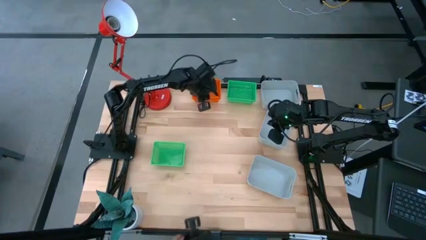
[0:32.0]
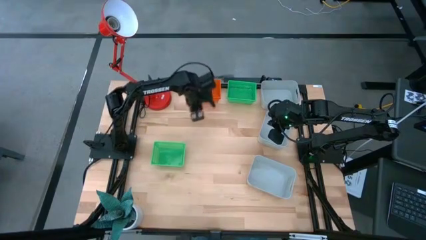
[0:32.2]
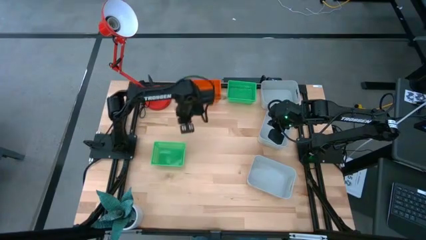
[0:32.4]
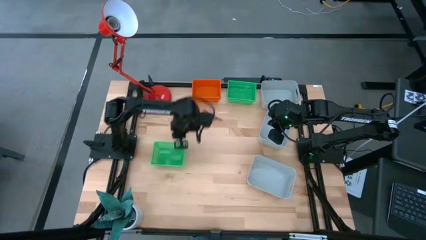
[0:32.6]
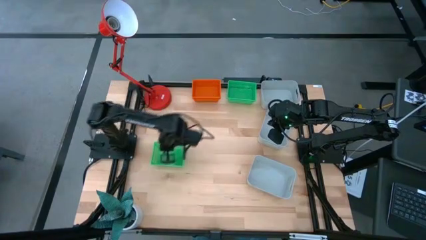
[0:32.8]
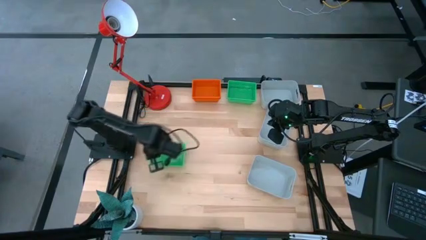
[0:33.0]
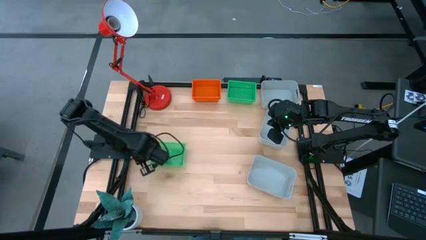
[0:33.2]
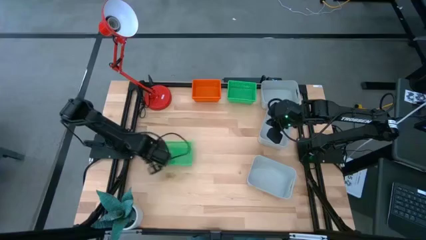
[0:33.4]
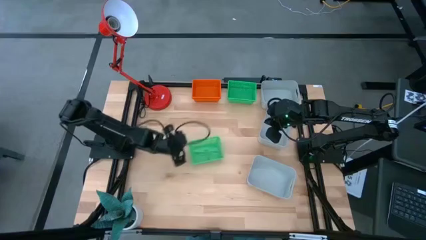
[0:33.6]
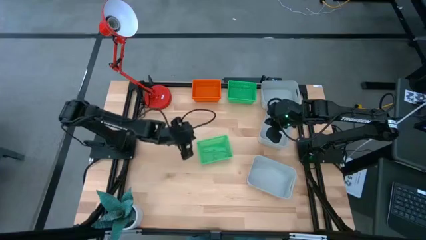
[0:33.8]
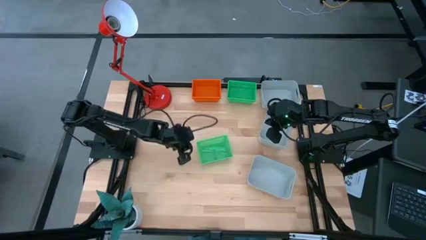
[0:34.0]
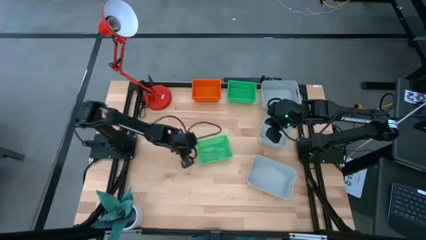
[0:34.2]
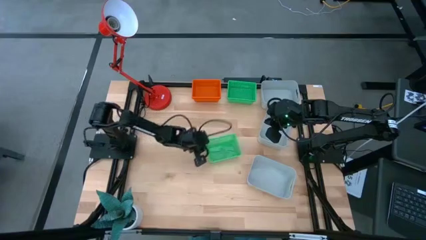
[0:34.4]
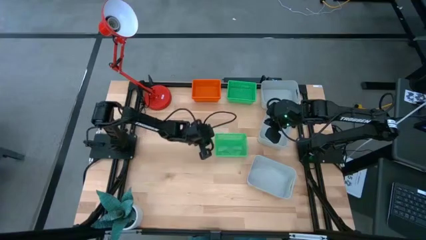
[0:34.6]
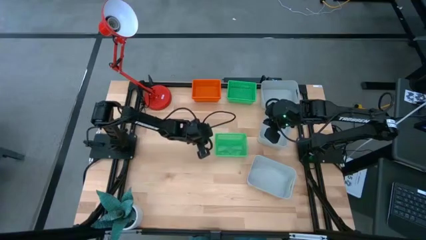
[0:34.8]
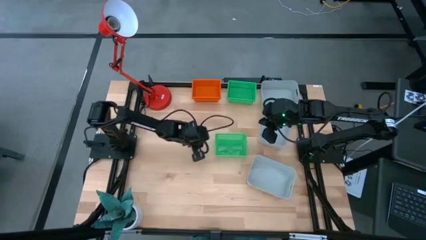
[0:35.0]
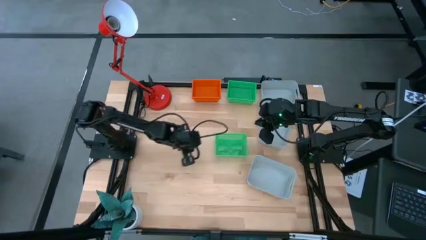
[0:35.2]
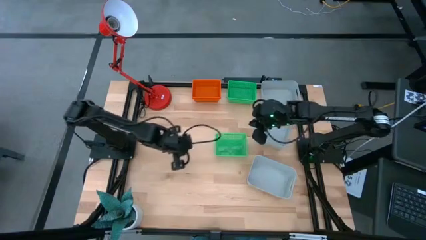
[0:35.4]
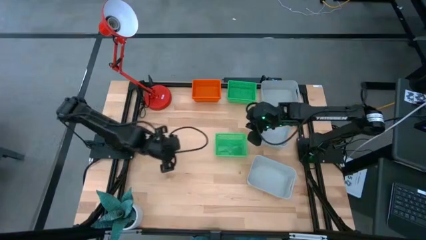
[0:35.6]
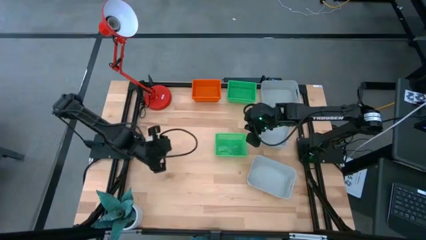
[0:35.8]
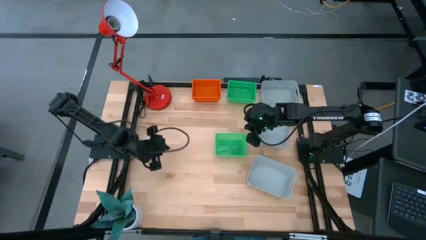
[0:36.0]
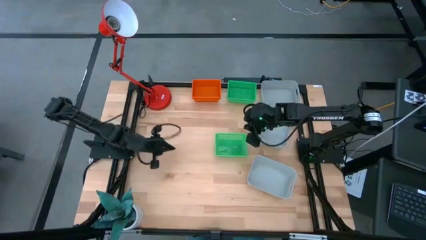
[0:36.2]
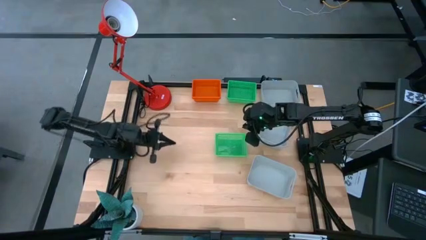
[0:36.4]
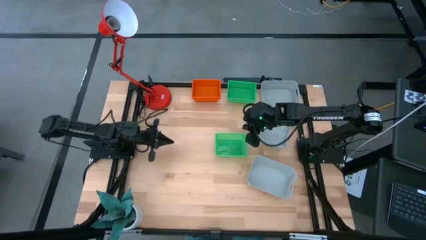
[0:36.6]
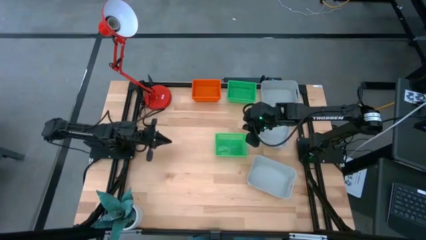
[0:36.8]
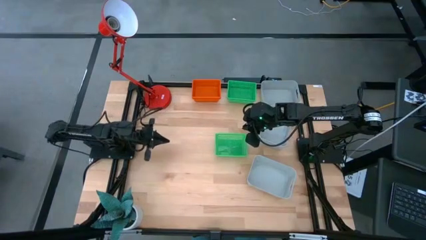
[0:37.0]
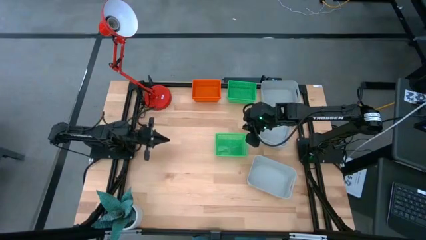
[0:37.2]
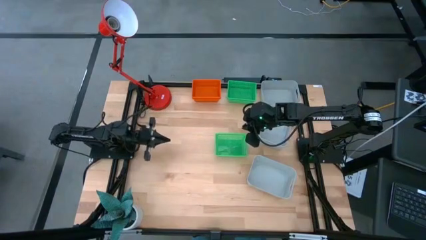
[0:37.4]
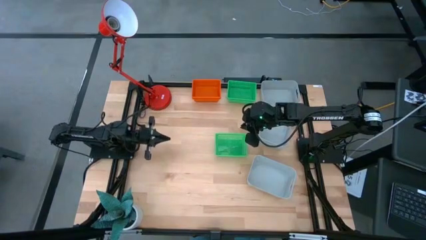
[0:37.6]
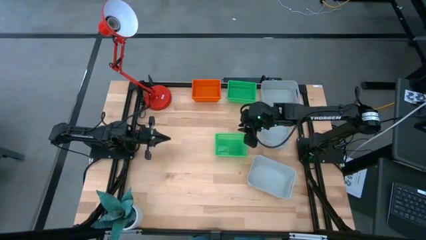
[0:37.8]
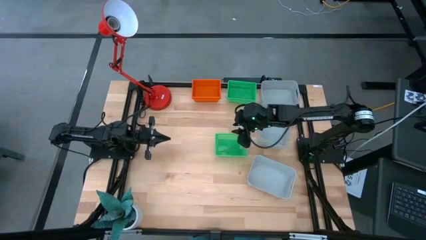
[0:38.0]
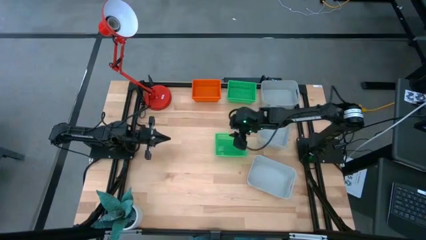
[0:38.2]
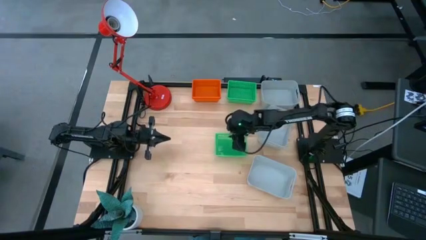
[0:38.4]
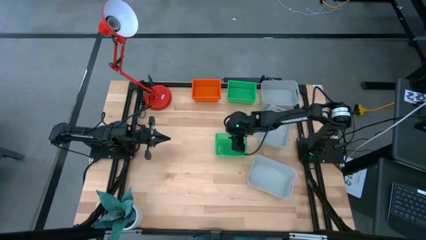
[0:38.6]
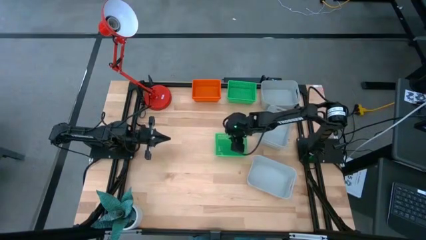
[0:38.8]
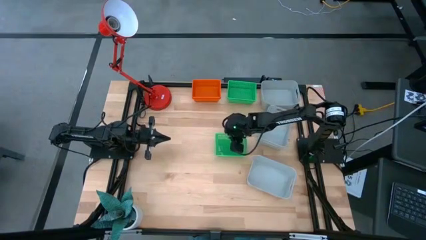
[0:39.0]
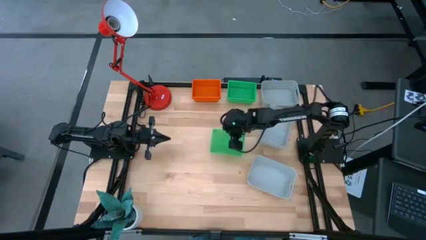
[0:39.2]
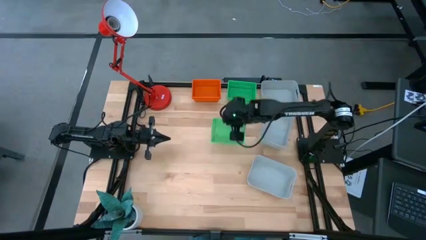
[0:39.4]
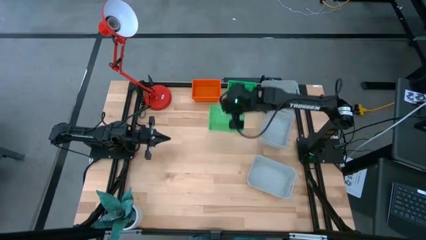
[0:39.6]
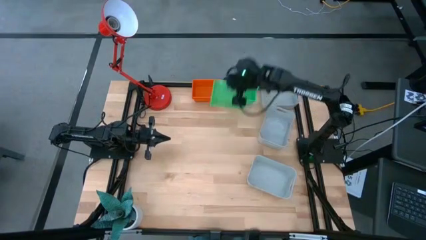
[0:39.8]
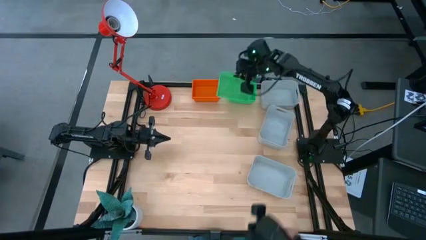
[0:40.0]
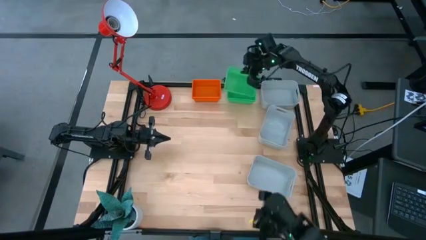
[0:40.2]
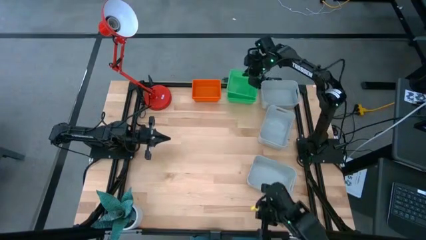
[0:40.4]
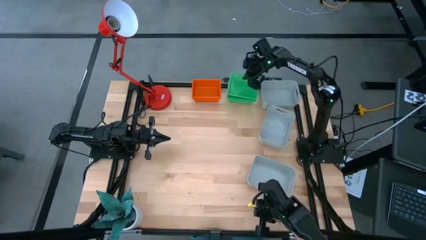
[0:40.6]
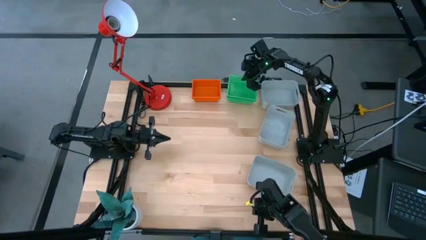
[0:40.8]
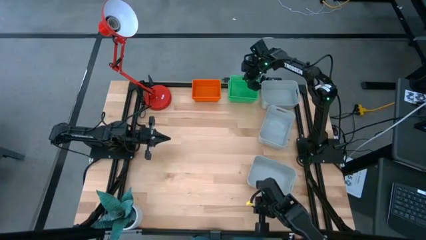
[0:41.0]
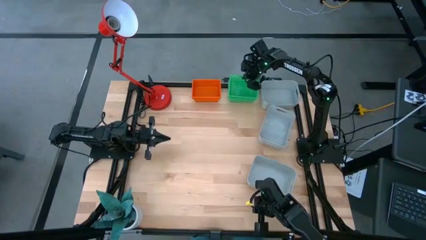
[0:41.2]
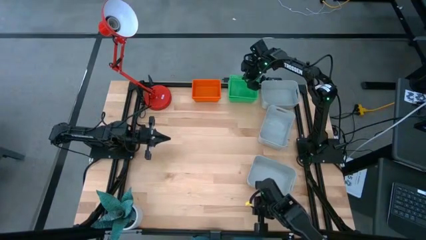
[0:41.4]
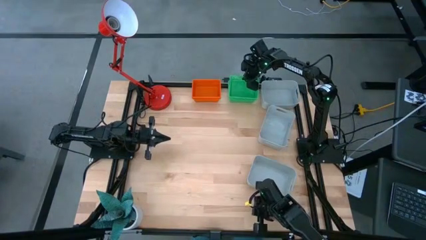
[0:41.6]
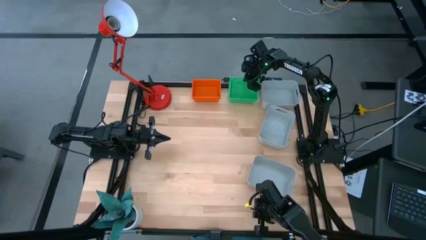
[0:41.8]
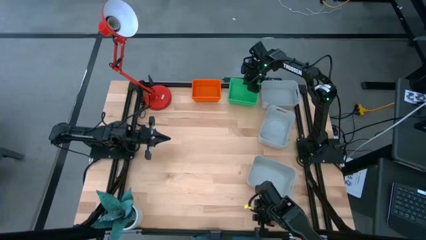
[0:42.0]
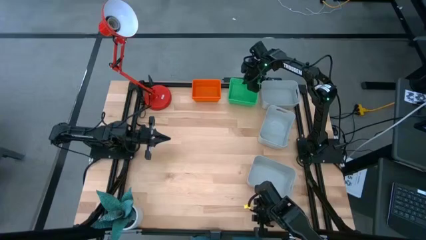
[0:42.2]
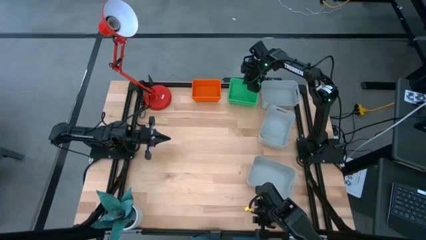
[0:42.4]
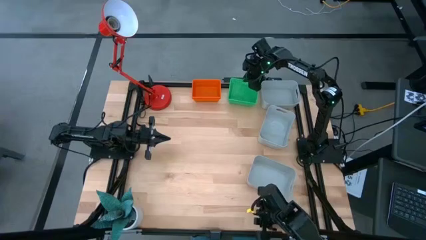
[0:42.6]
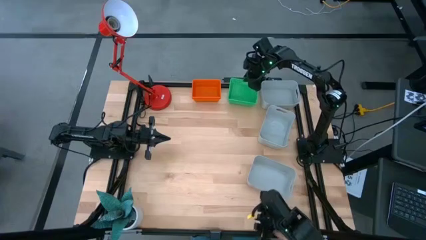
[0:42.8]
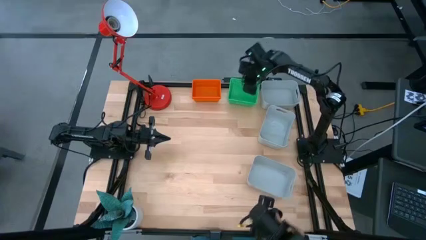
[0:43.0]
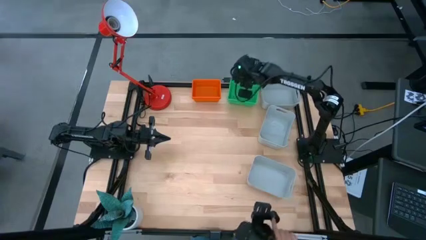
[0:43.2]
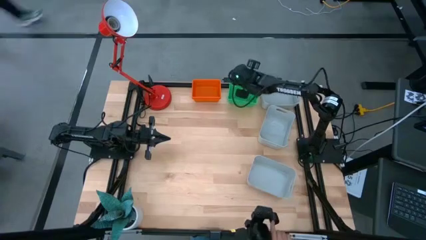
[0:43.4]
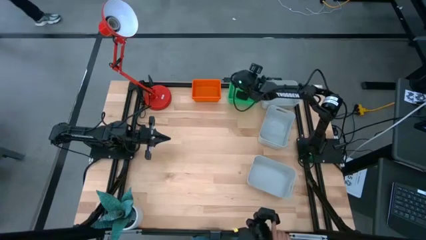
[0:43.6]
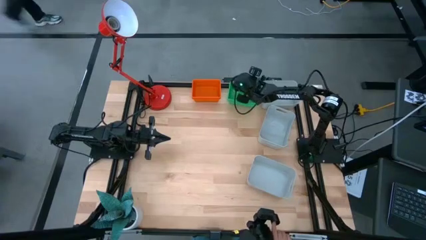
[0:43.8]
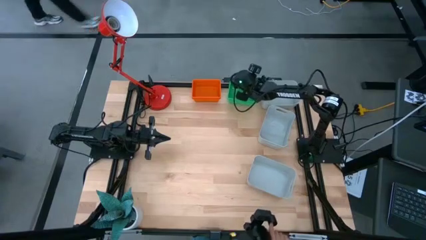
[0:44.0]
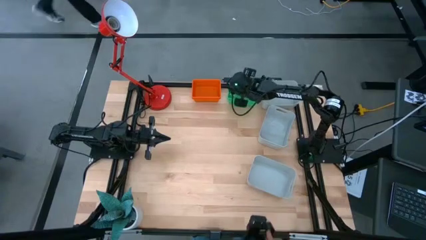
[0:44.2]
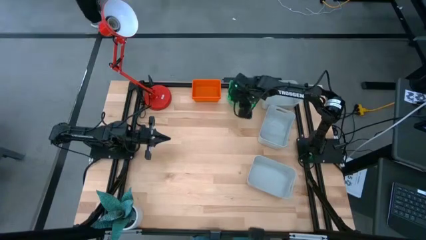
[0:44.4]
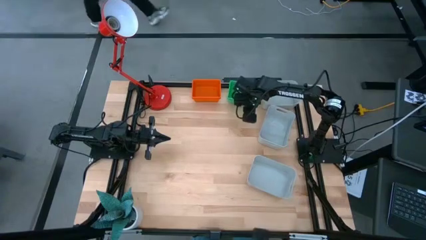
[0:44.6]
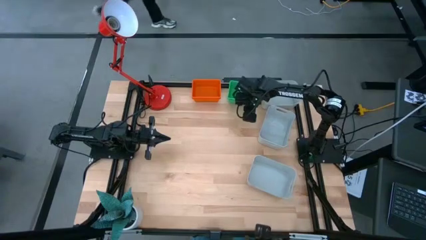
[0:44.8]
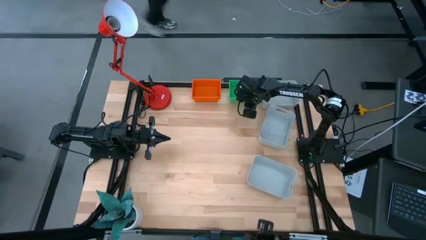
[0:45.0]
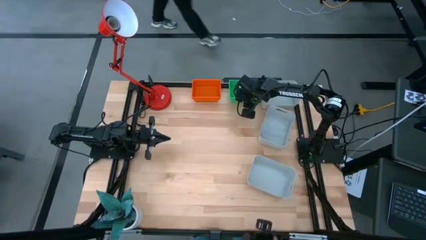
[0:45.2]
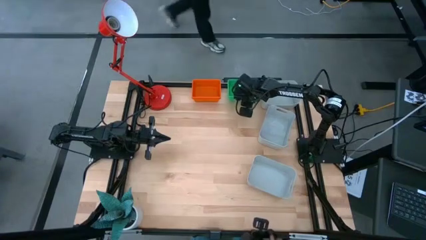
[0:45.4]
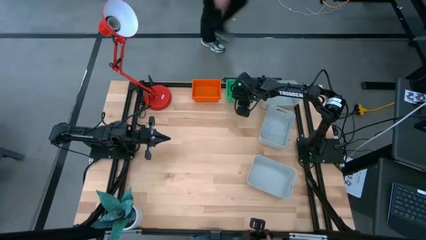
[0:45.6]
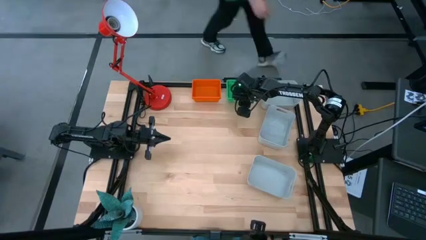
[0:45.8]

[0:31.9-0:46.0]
Stack the green bin on the top green bin

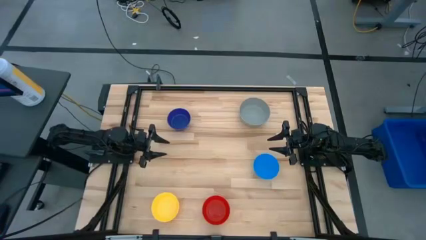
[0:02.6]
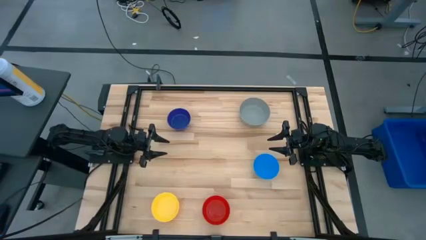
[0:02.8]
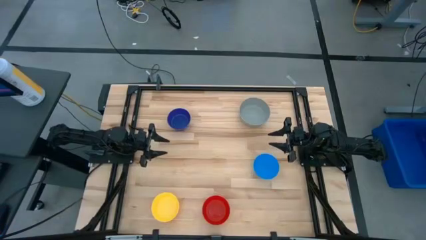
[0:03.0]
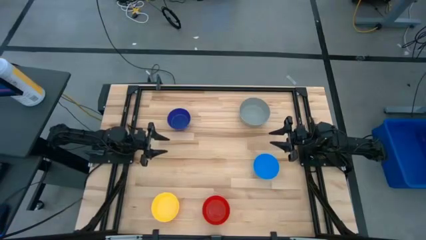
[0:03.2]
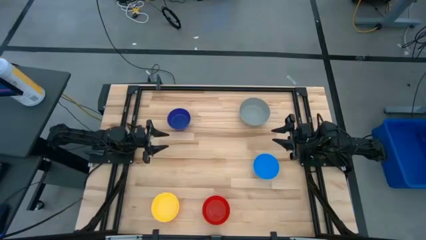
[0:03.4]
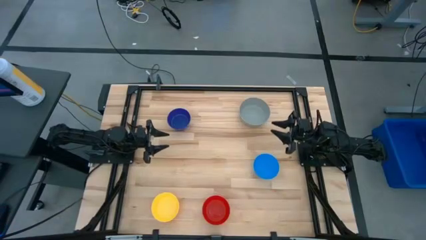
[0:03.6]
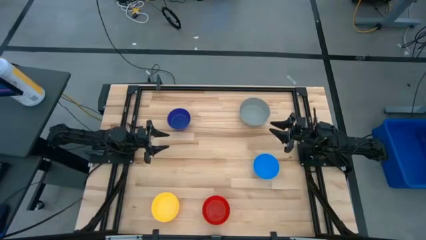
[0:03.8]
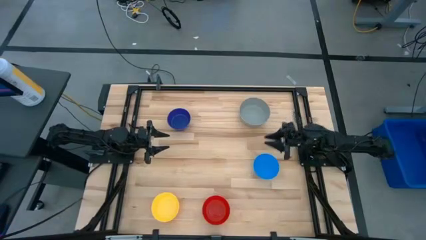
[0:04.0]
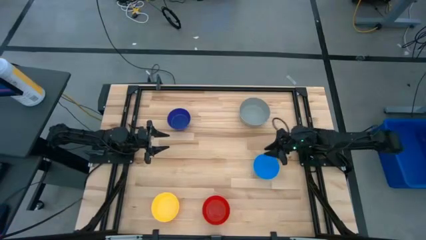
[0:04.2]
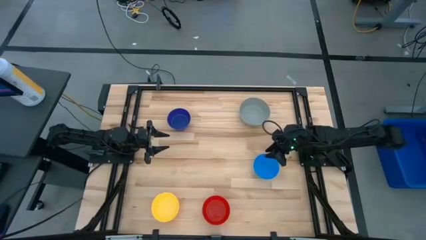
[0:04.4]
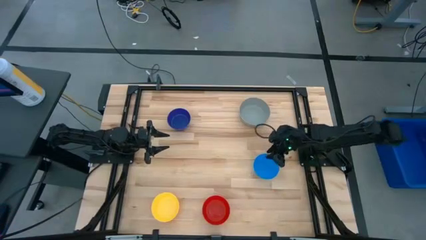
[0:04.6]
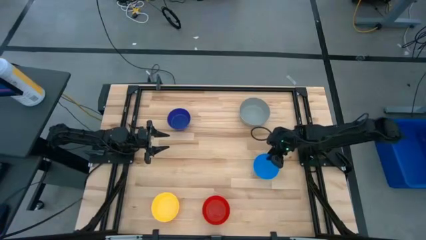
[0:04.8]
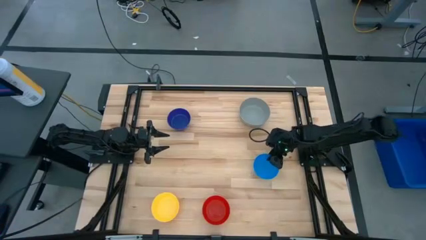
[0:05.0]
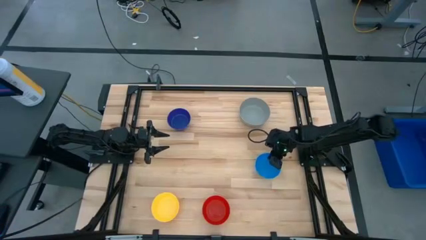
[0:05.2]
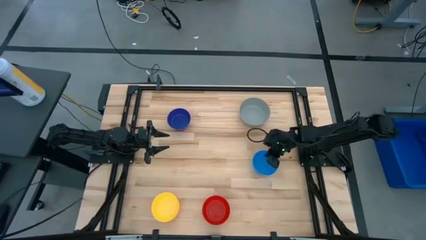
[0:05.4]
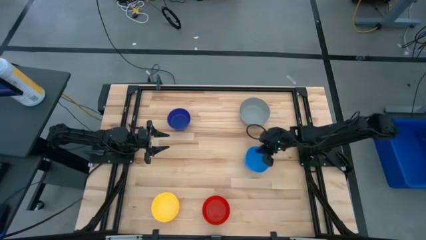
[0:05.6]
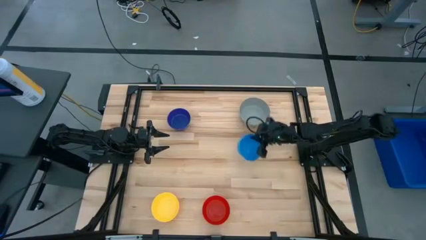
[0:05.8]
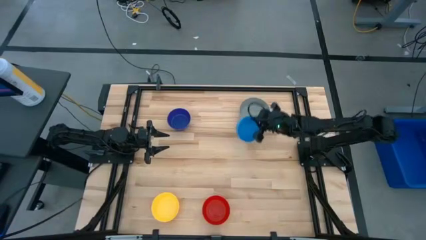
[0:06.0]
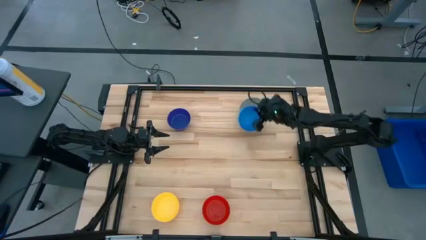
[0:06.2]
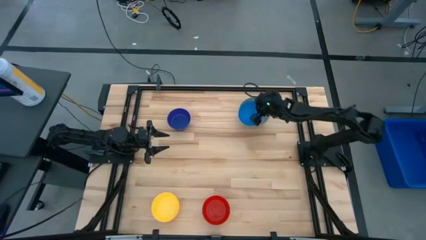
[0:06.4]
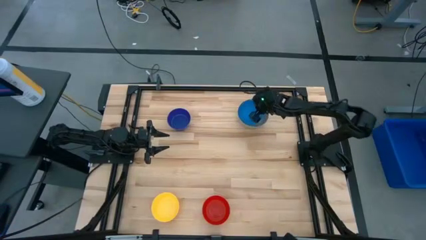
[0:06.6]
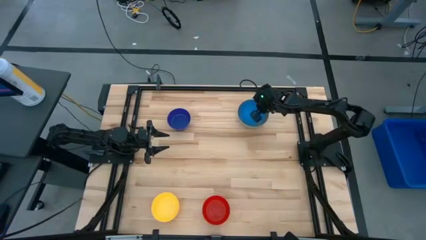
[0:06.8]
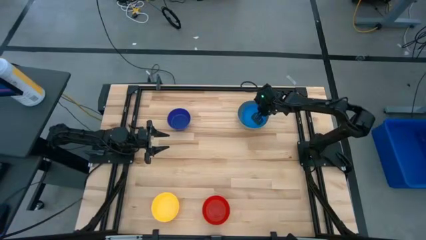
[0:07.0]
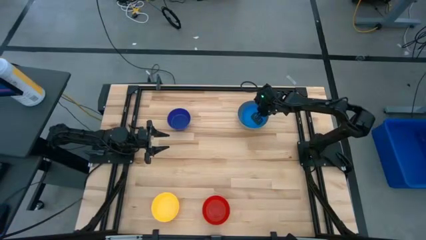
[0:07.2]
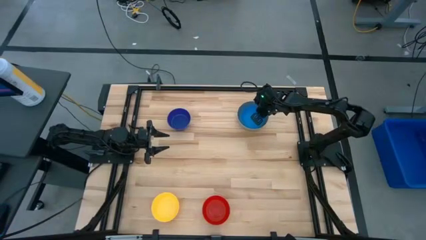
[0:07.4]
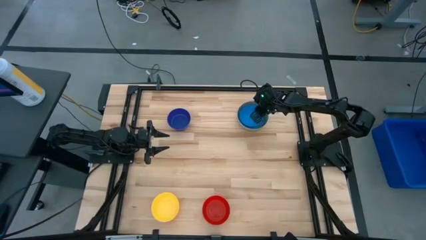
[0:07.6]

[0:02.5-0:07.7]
Stack the light blue bowl on top of the gray bowl
